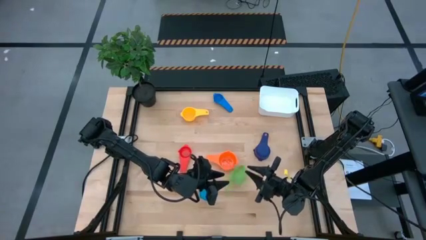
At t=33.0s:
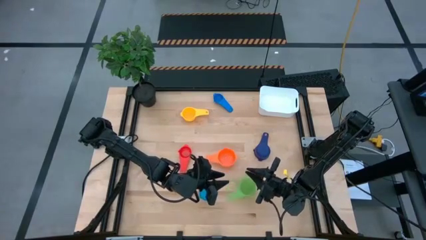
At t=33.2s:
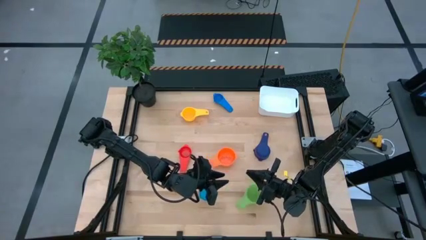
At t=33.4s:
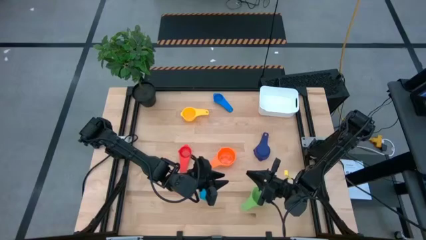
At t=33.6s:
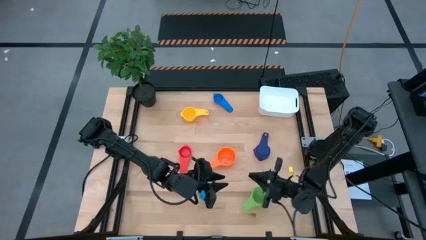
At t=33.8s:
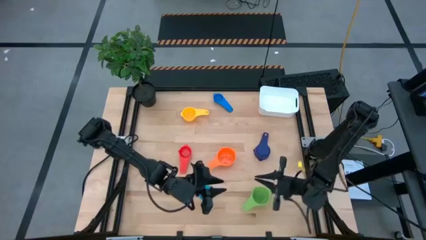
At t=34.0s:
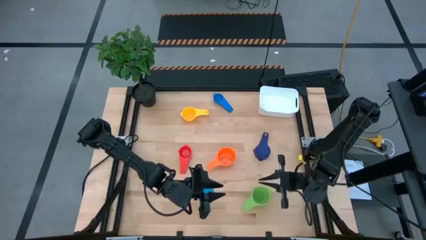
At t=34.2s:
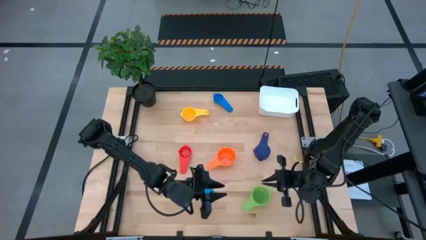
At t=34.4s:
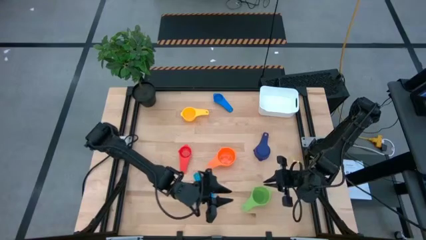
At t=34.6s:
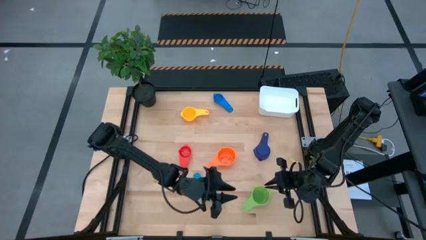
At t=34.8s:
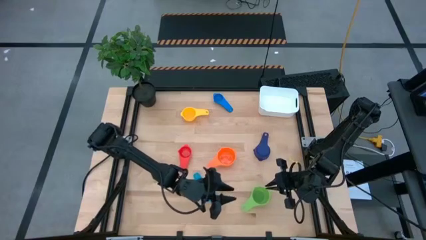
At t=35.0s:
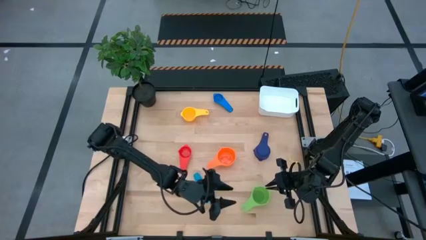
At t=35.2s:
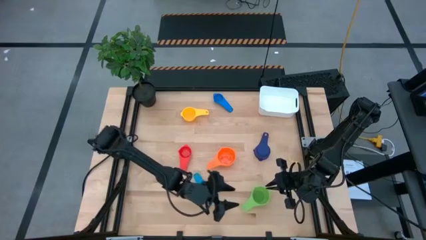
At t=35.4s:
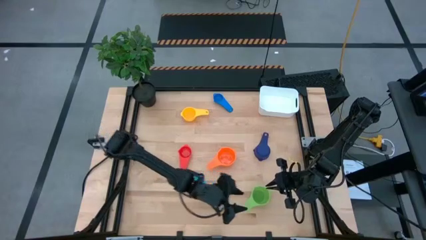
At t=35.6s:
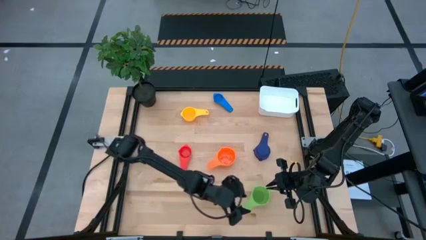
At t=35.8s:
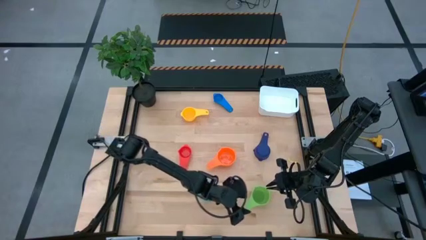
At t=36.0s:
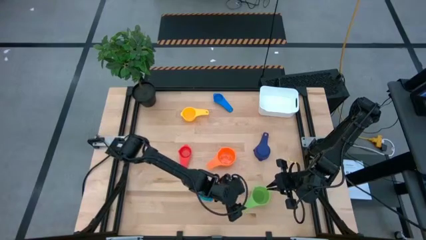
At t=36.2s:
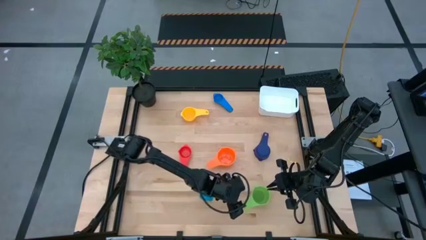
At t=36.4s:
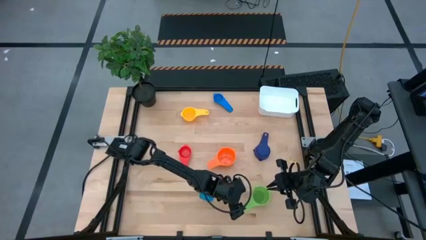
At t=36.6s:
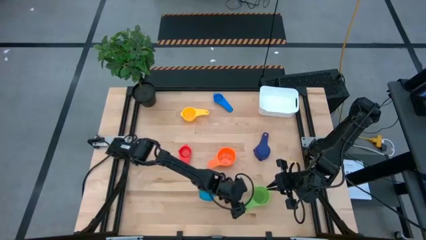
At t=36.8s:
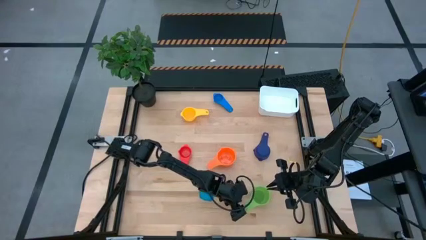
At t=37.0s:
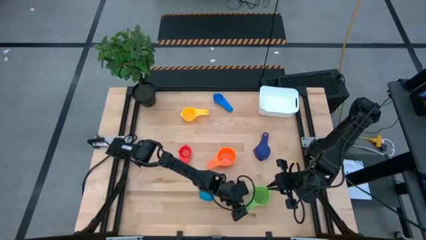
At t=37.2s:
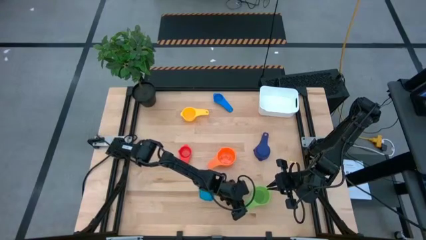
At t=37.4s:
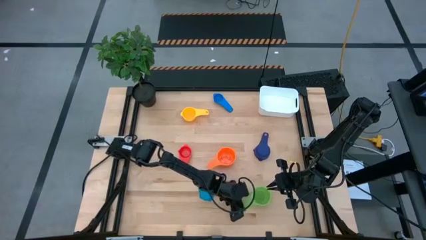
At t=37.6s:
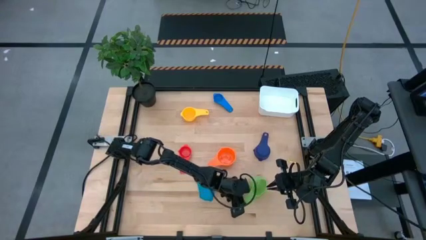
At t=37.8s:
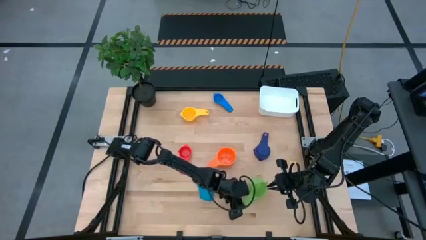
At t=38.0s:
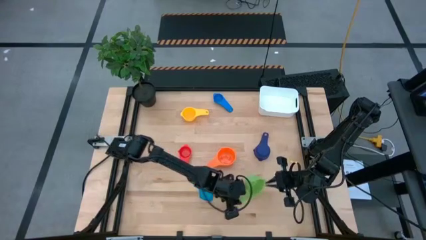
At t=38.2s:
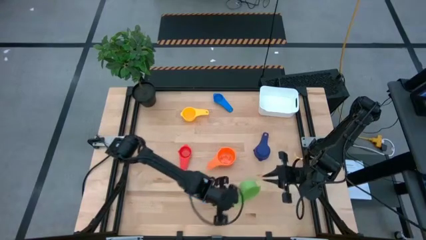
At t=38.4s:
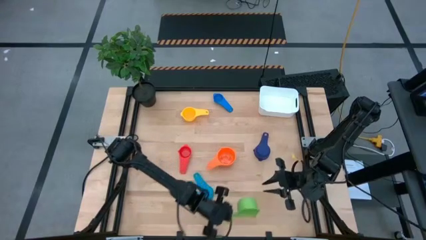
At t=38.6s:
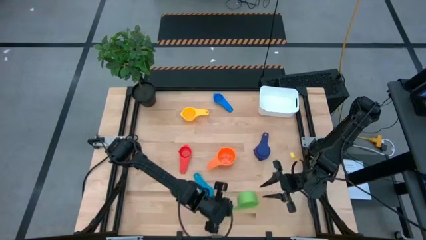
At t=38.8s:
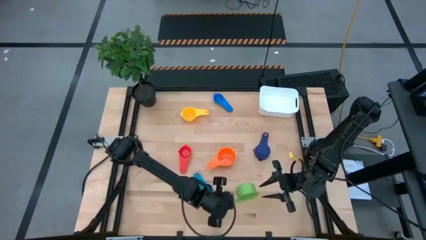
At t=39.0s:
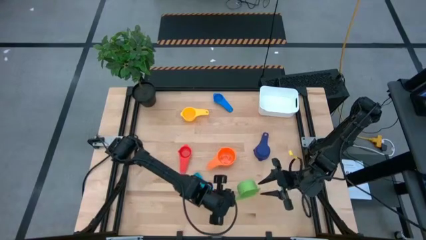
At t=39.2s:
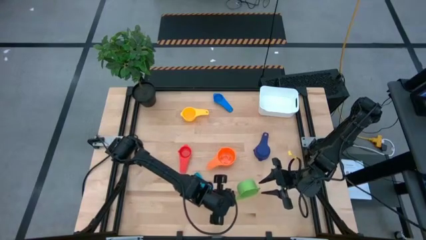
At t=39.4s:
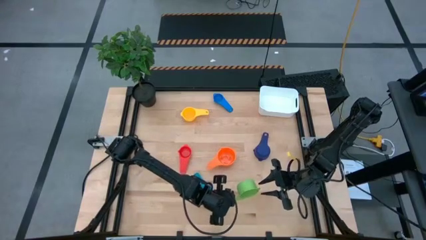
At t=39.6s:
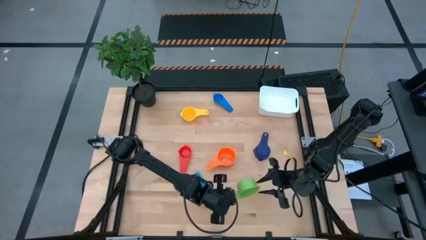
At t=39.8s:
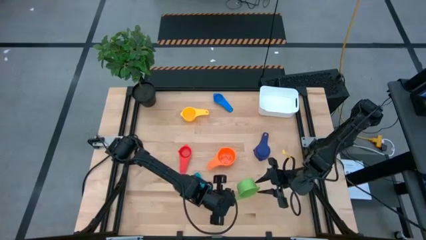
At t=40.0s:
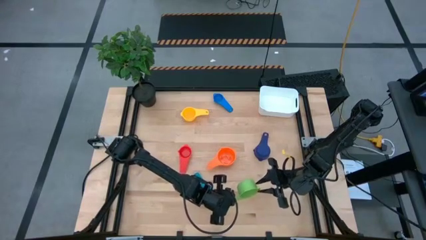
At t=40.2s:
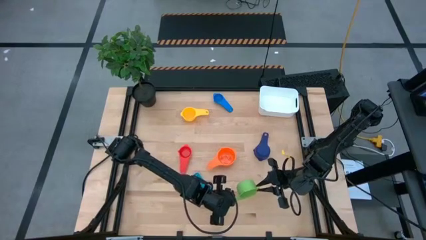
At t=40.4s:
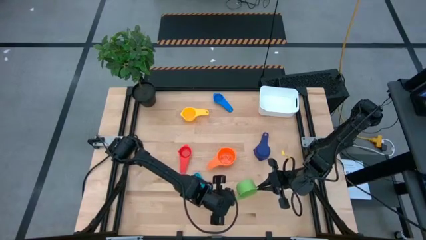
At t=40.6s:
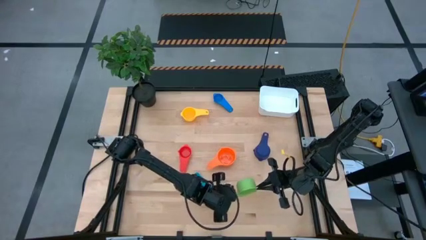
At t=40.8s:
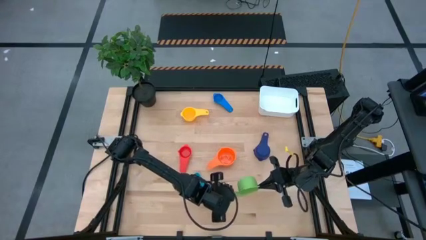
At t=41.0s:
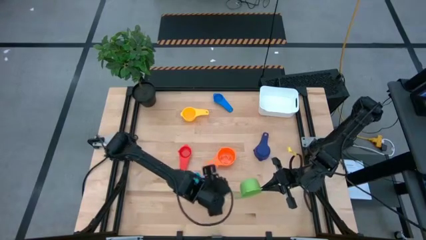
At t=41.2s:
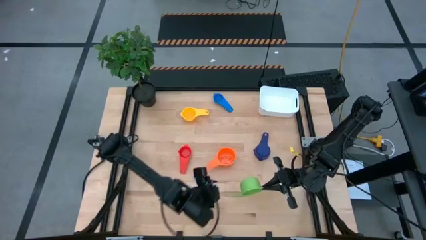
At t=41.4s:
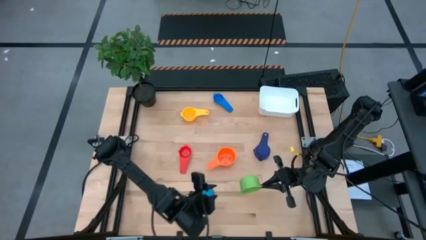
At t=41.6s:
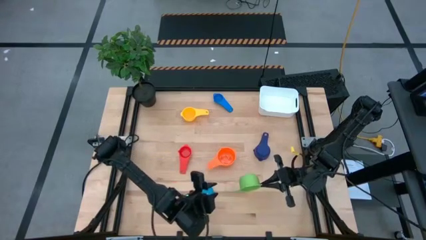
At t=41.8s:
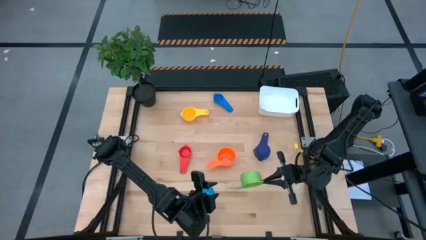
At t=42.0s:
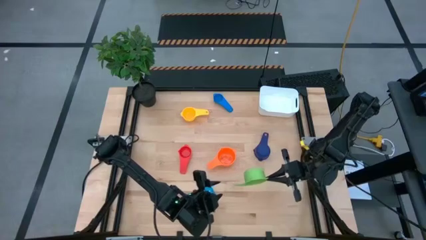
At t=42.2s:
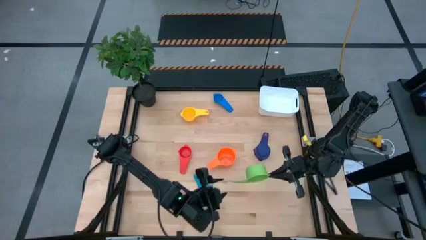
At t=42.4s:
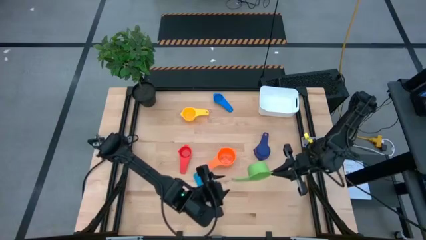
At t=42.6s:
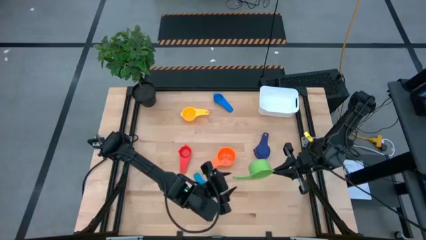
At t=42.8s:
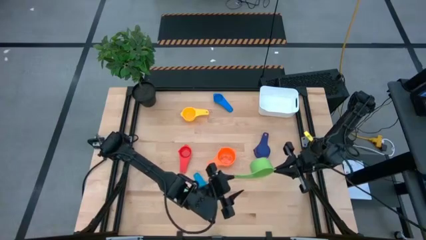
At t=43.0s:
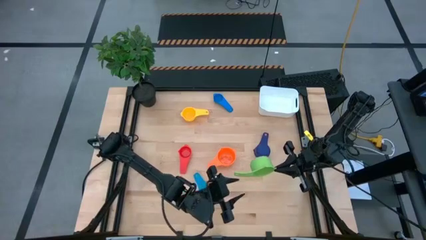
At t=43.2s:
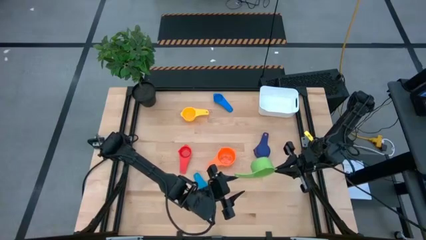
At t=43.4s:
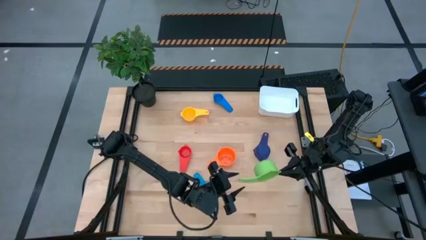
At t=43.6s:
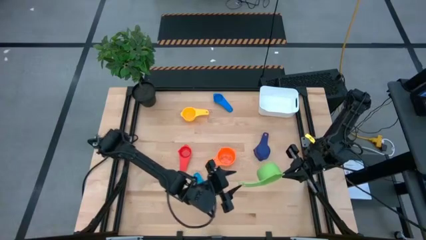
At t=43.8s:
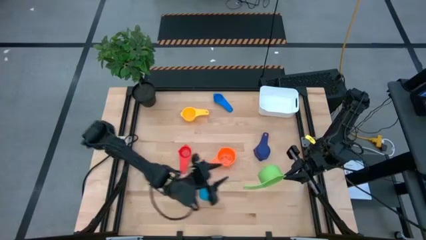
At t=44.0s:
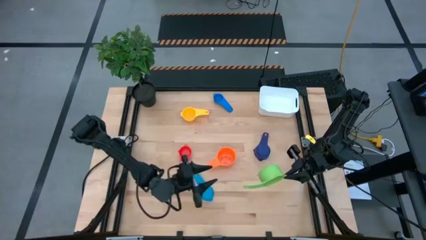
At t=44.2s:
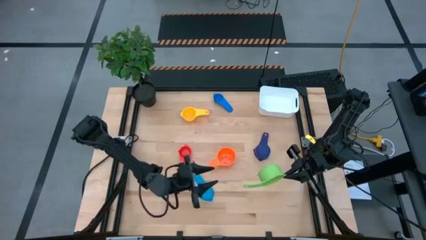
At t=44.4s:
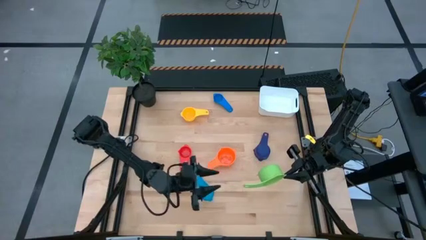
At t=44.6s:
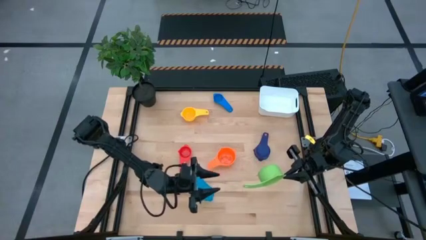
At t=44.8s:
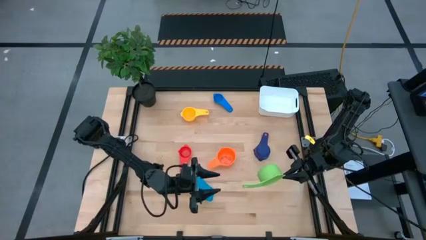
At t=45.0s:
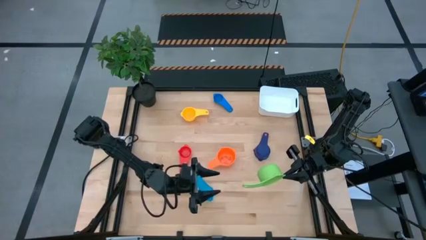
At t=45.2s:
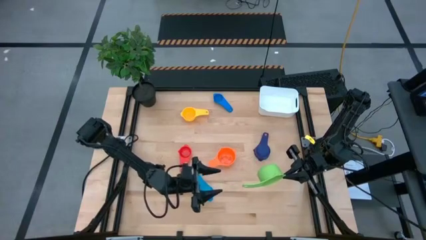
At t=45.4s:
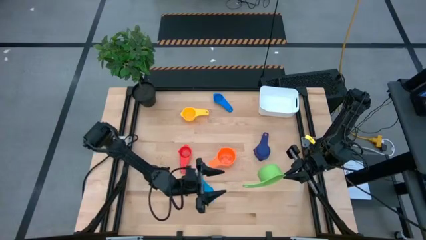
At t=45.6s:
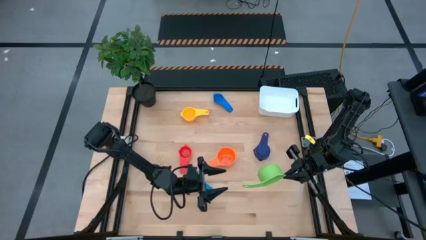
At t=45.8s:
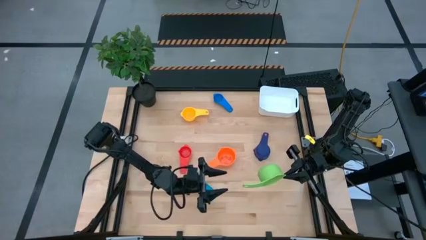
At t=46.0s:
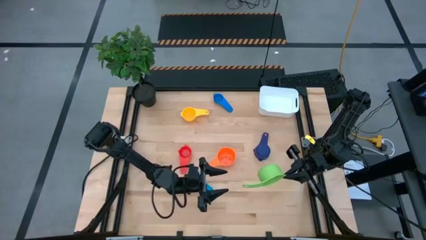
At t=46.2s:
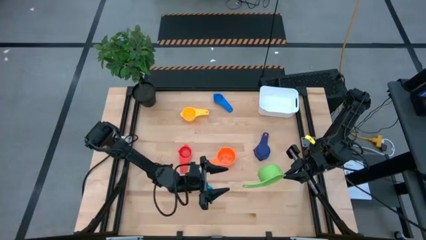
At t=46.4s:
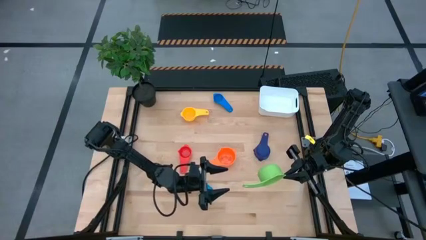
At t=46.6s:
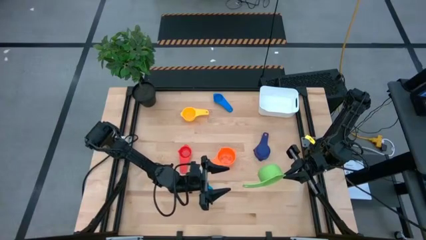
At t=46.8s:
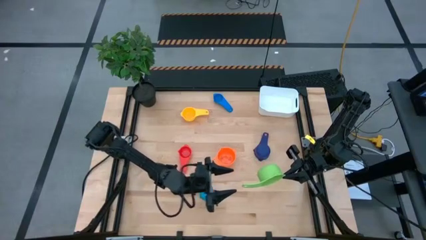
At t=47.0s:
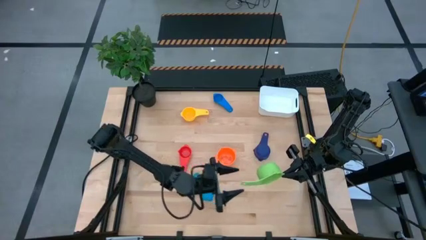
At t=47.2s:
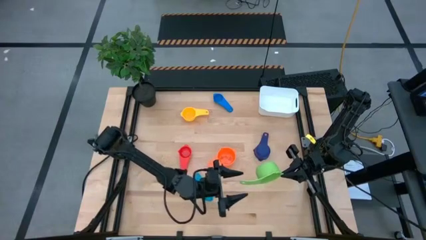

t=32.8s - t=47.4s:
Task: Nest measuring cups in basket
Stack the green measuring cup on top of the orange measuring cup

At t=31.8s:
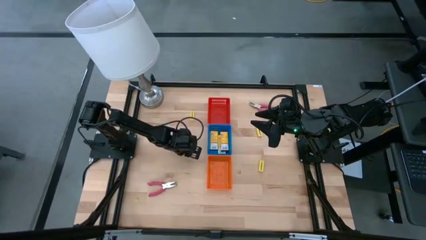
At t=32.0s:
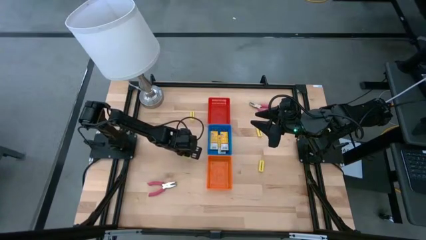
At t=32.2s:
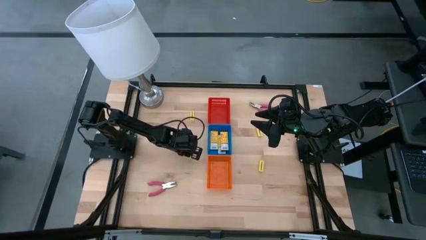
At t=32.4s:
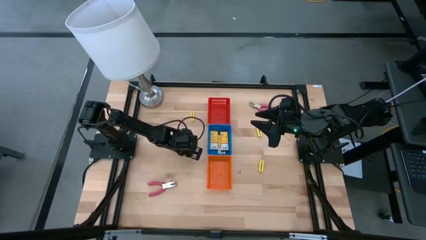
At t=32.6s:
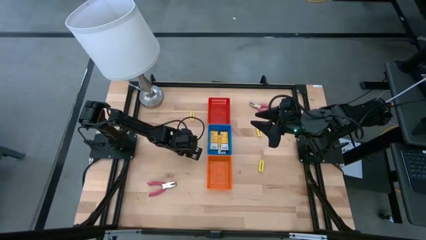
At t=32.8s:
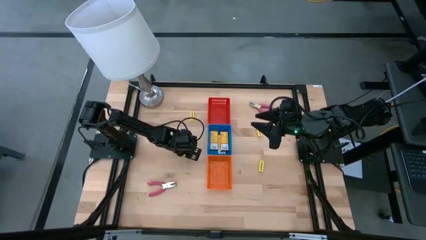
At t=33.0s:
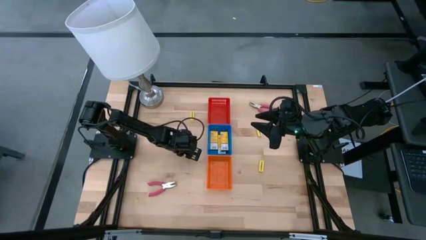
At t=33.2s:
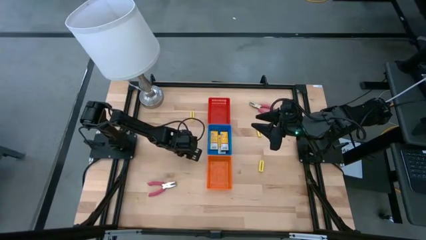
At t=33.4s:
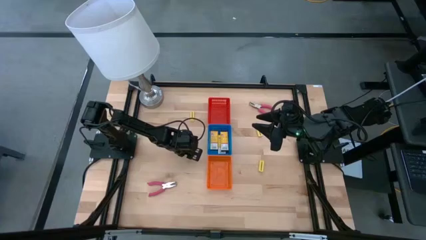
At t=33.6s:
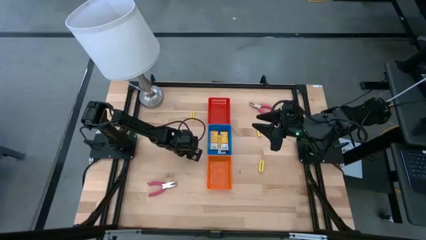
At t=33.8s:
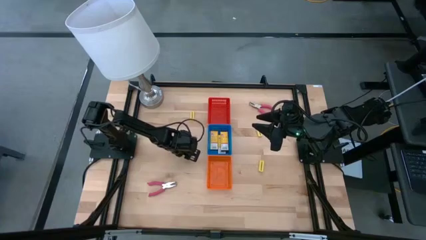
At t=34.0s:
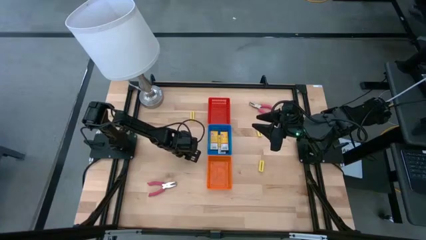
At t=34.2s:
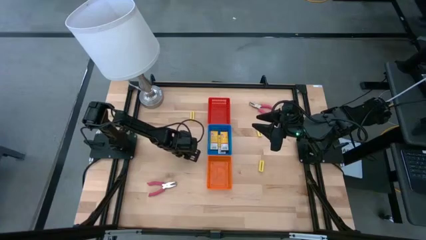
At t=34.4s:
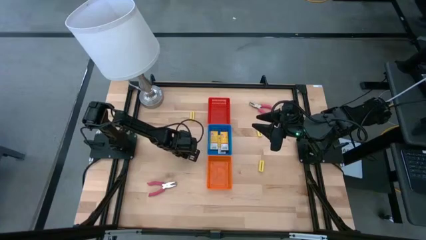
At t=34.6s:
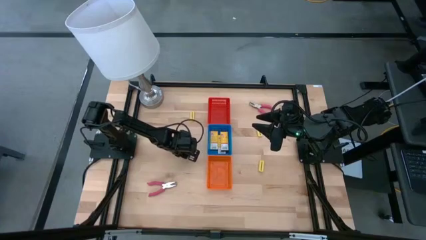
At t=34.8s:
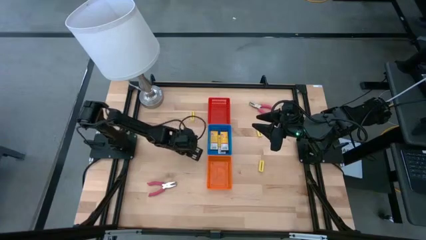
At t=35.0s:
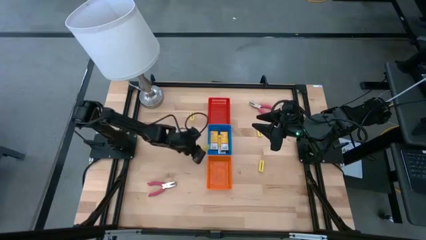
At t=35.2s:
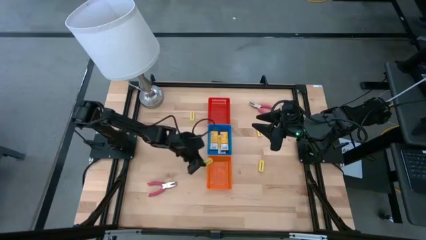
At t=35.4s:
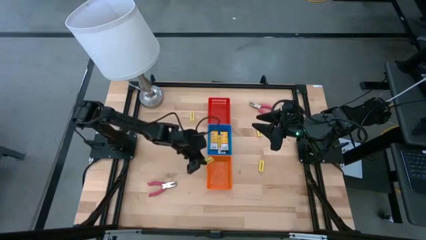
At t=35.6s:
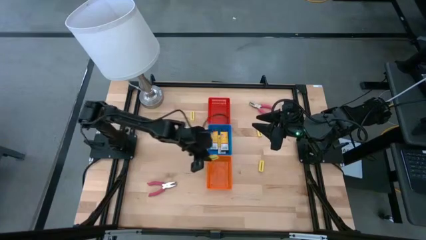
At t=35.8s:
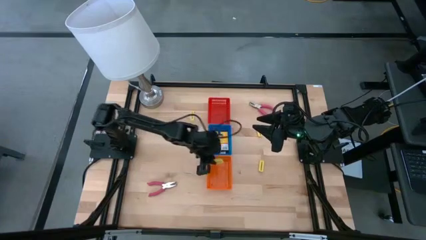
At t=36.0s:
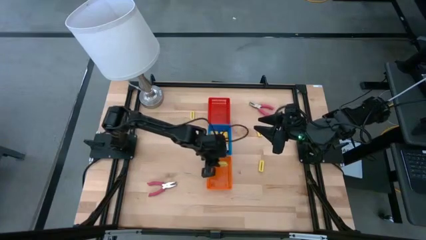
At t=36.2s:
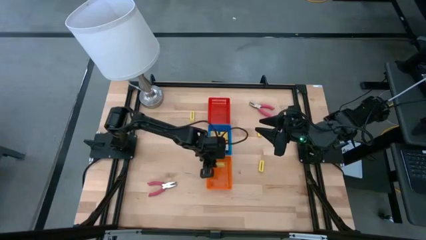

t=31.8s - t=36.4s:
Task: Pick & Place School Supplies
Put the yellow eraser into the orange bin
